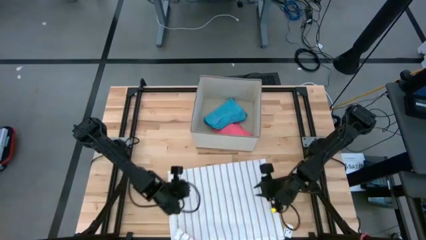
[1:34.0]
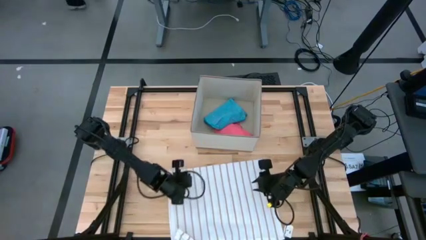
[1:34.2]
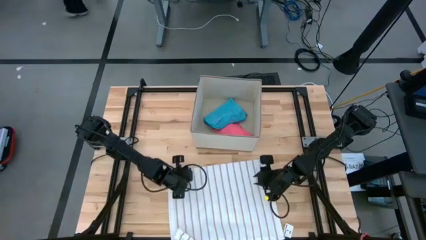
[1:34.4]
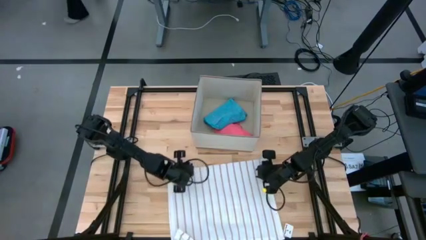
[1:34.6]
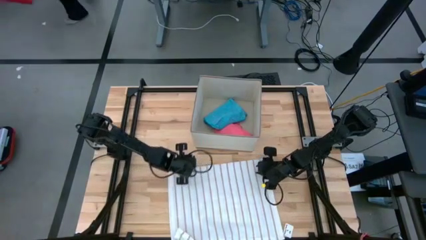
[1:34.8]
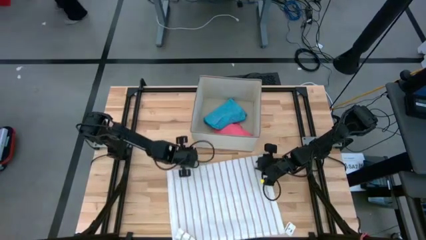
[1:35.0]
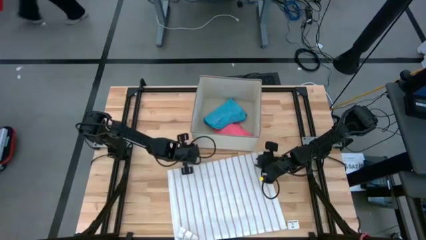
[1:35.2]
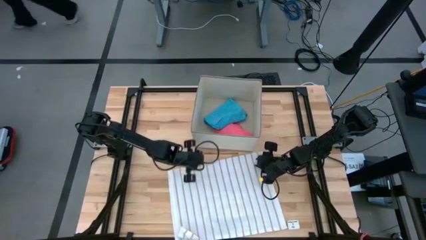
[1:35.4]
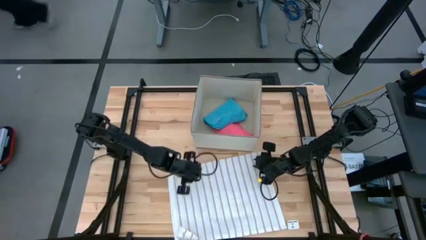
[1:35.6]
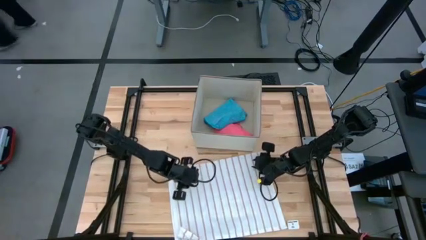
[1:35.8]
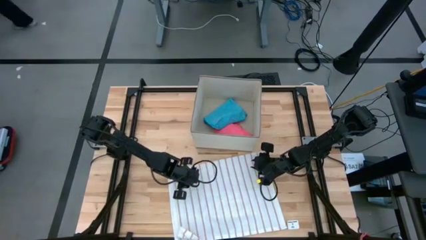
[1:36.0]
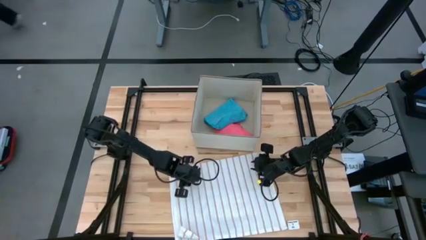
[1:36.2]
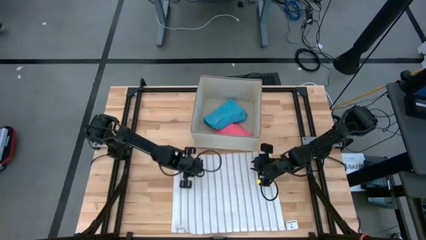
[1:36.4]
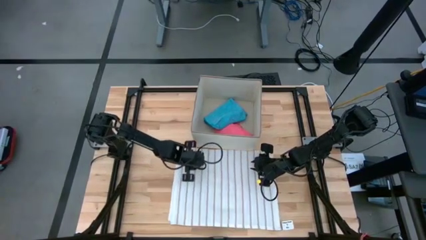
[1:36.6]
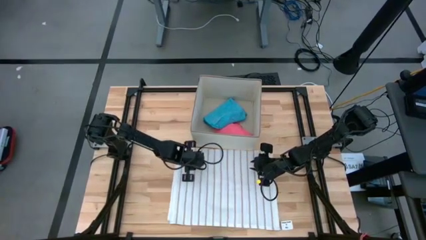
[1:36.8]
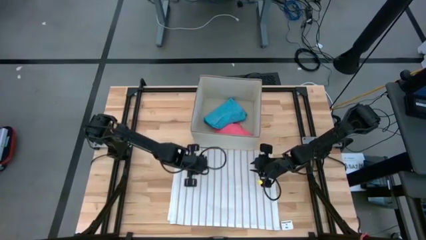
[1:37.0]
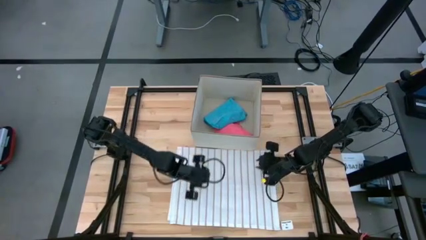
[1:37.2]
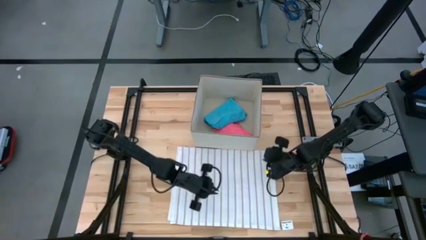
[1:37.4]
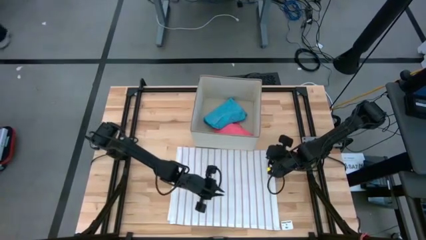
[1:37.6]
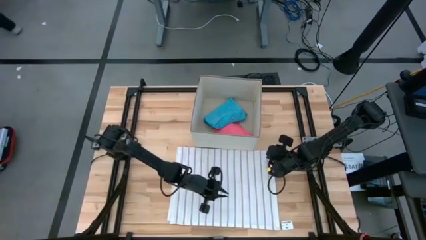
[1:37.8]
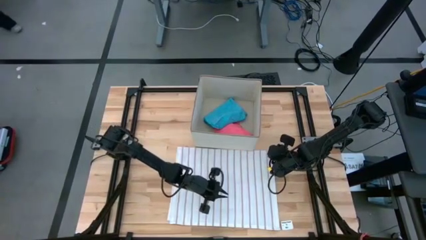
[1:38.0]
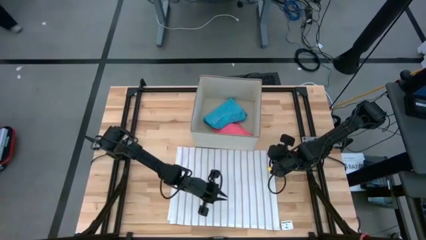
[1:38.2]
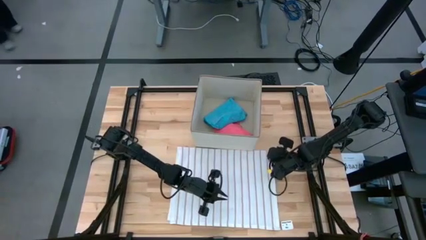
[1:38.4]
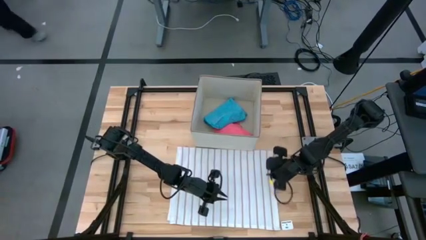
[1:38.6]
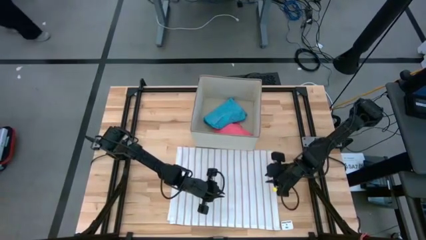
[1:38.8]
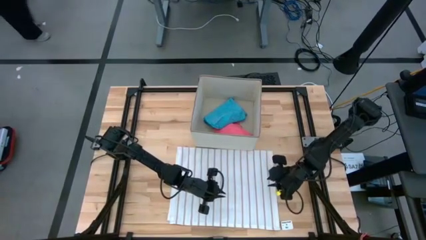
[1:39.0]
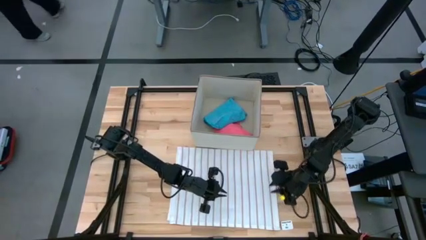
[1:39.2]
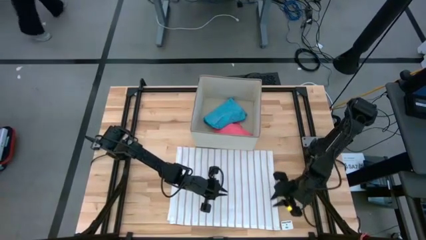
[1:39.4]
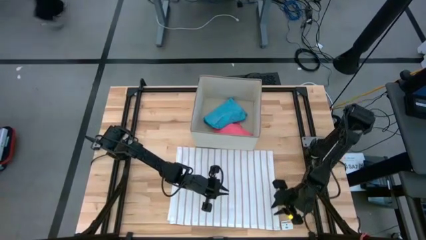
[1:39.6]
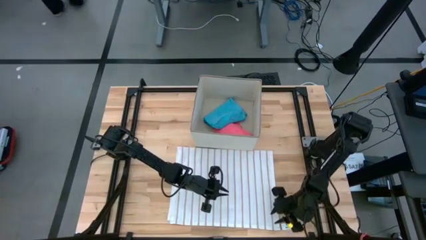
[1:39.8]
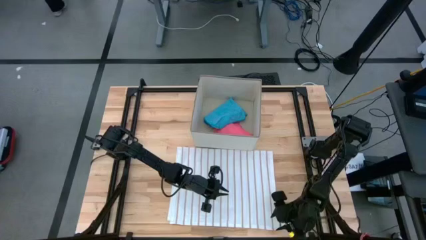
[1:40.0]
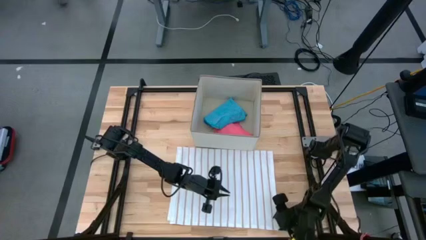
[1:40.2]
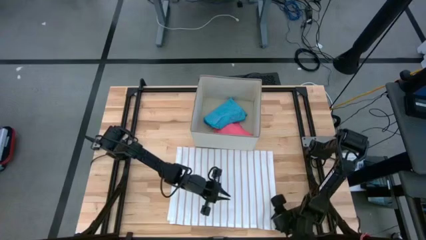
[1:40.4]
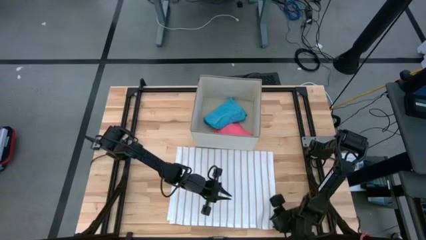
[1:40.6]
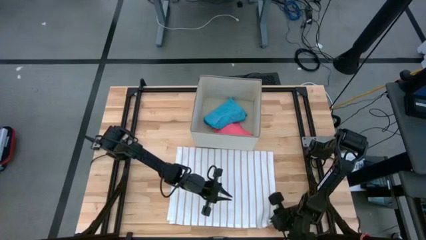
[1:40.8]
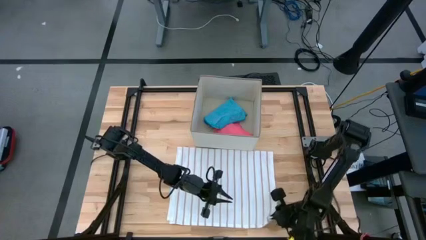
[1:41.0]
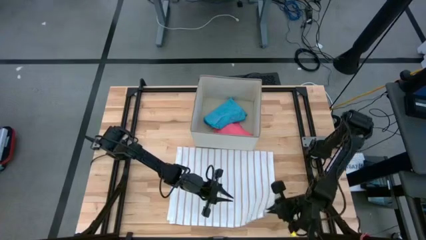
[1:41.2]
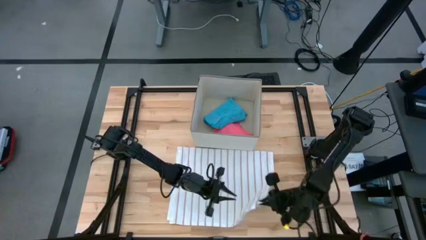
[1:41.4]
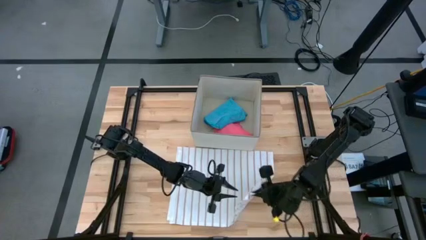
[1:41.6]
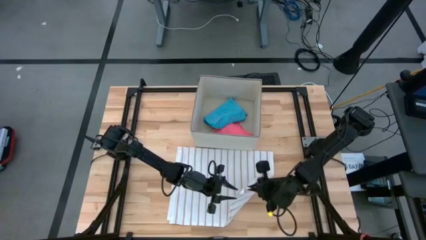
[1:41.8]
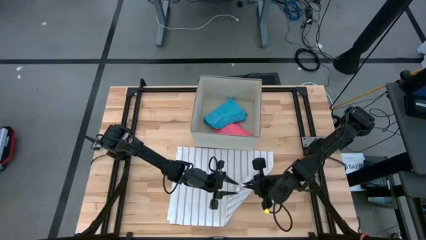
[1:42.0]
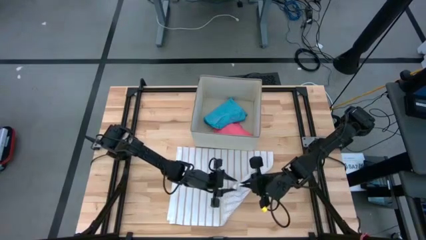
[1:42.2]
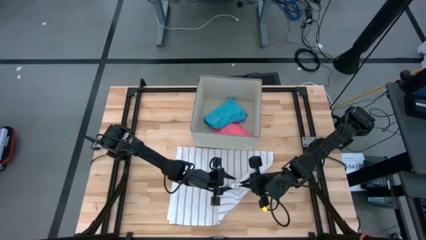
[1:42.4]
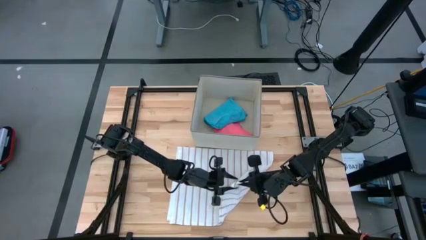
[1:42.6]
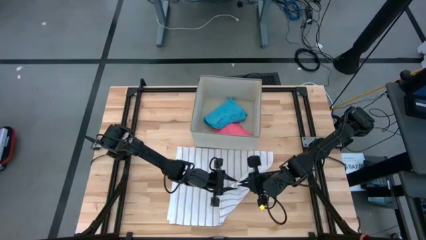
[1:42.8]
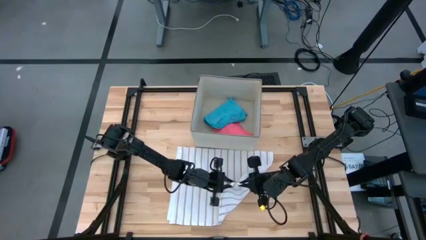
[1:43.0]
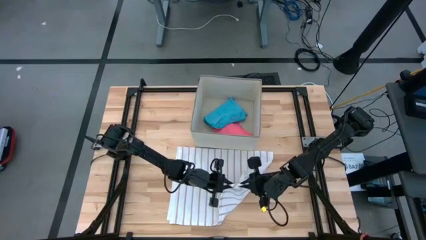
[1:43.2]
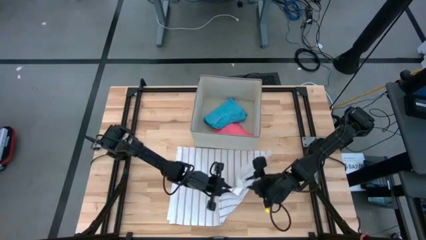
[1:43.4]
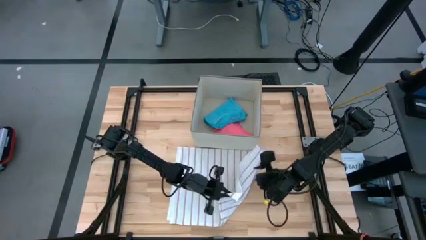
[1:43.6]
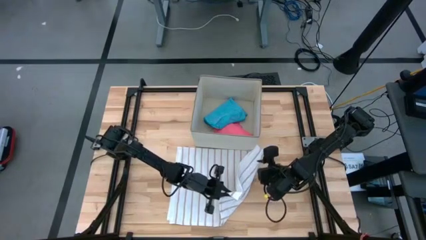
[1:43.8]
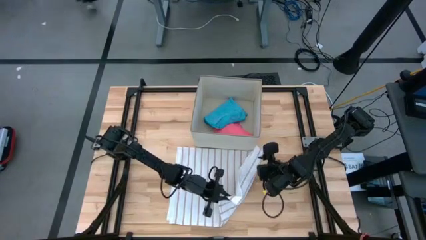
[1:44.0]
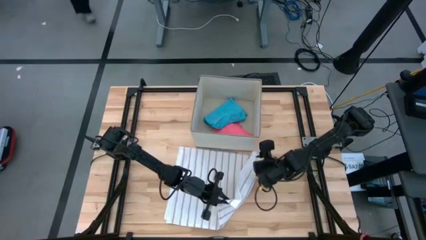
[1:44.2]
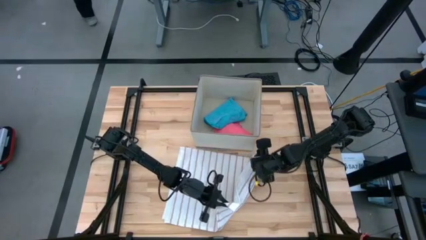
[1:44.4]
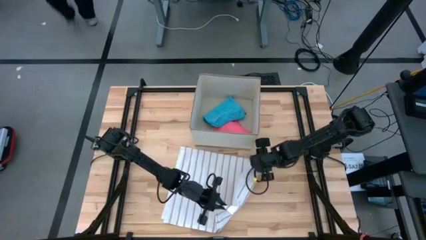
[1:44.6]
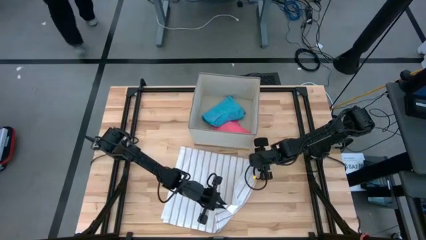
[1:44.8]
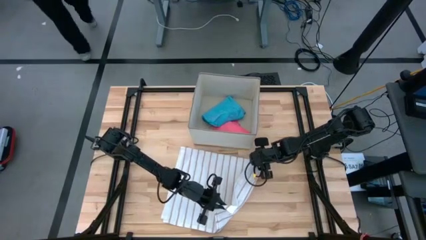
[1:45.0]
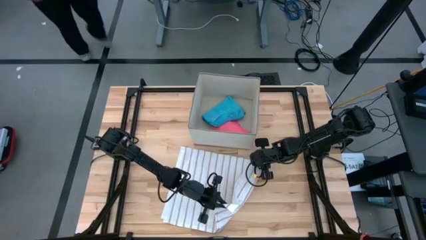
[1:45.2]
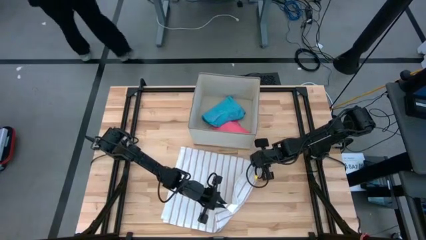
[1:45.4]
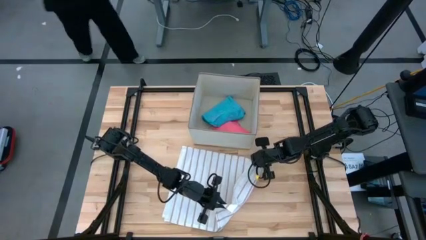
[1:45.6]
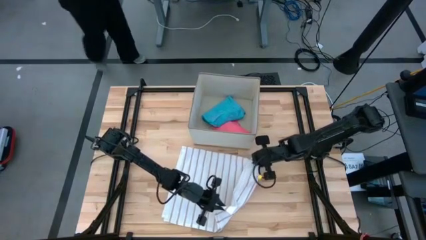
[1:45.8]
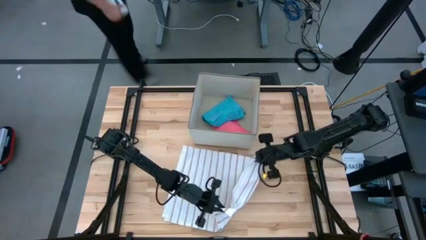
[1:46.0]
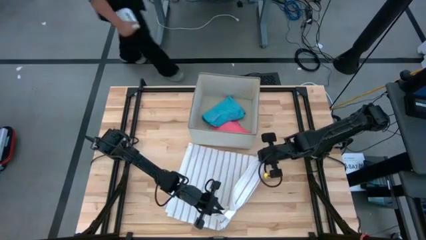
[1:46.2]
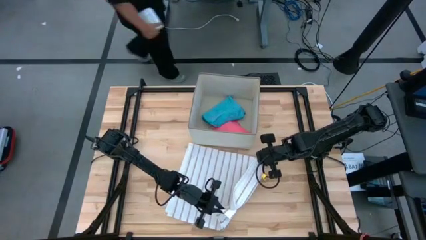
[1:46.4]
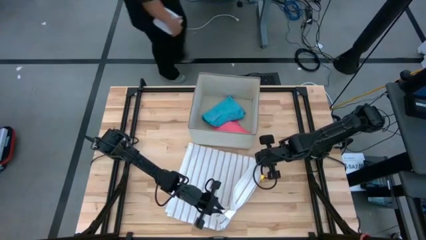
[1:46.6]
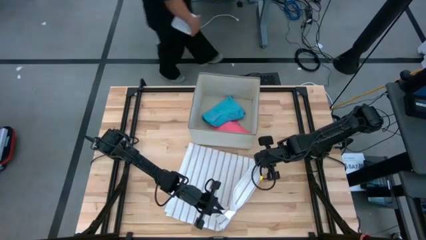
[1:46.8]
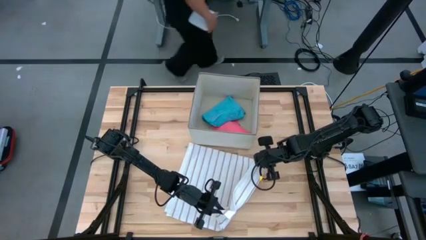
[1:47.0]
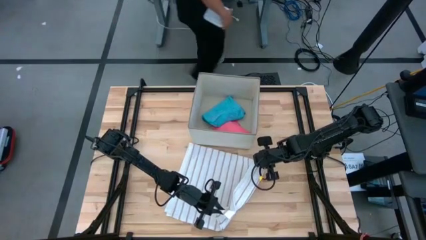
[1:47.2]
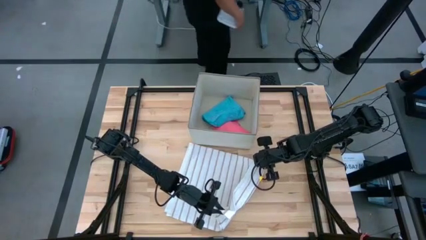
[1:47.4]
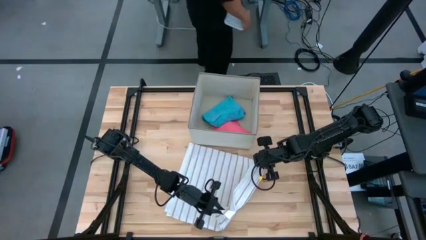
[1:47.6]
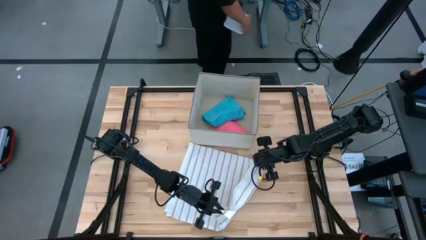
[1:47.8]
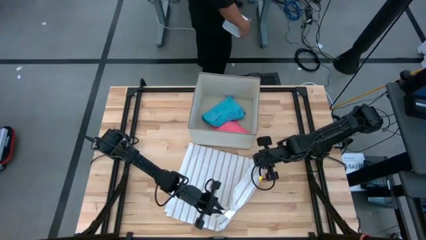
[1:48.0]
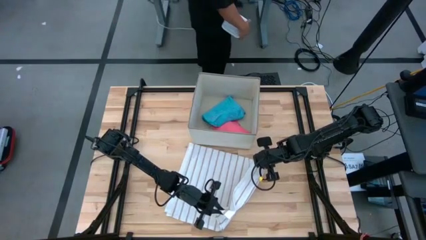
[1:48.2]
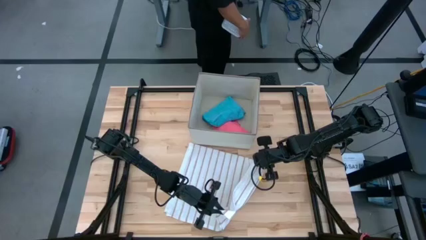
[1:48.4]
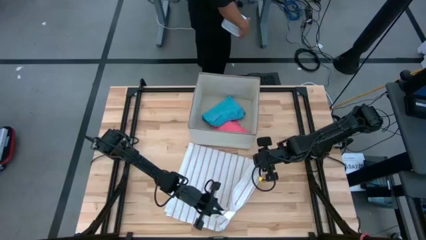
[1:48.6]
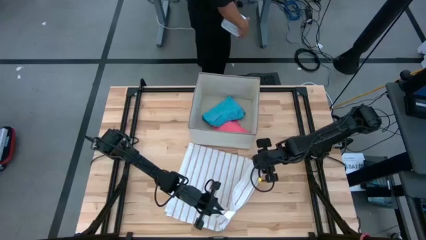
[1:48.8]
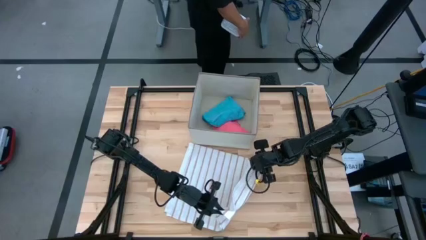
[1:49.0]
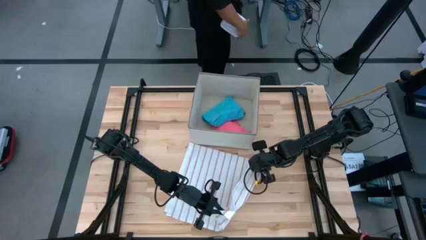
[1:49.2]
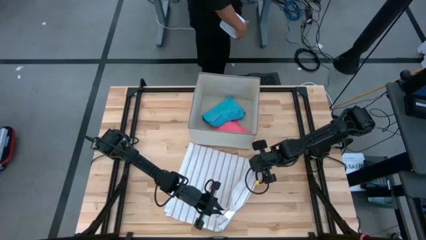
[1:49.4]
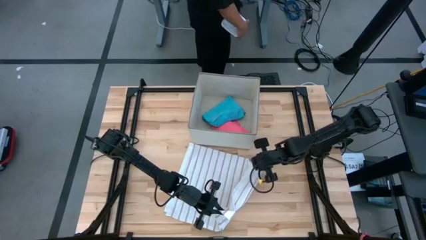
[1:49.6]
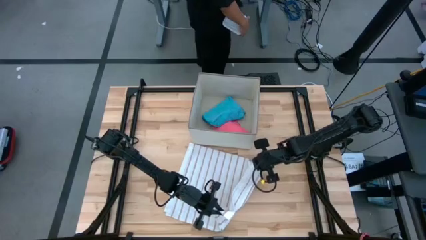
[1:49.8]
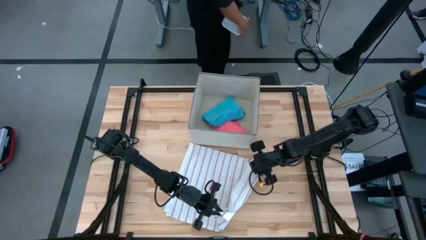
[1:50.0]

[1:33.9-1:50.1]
Task: Fold towel
Fold the white towel
